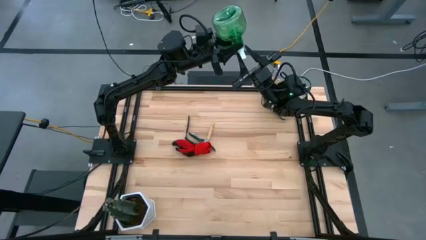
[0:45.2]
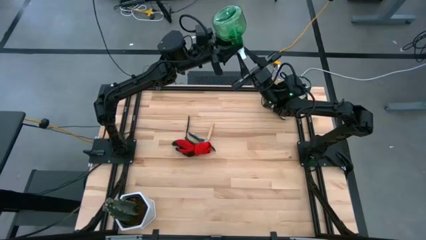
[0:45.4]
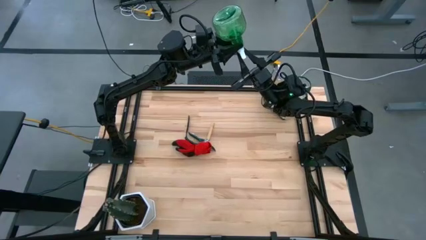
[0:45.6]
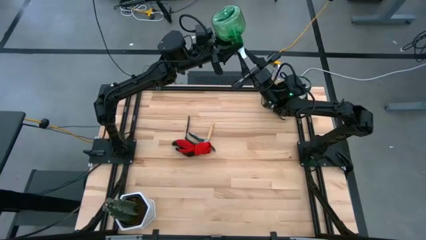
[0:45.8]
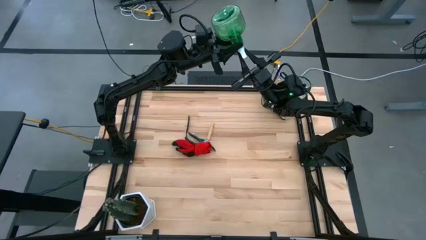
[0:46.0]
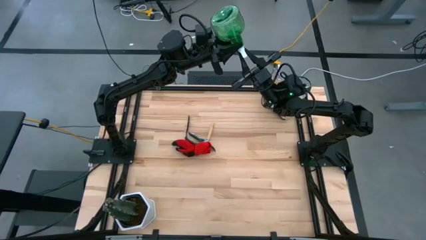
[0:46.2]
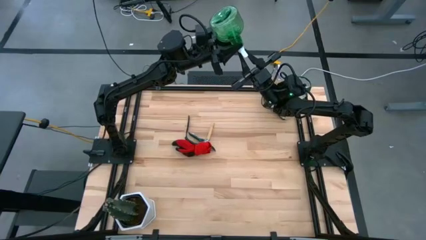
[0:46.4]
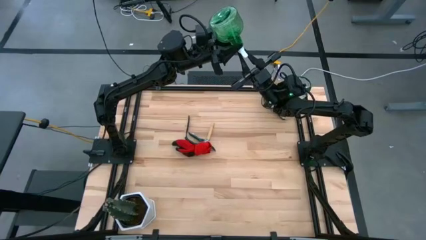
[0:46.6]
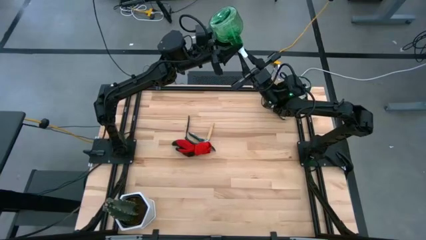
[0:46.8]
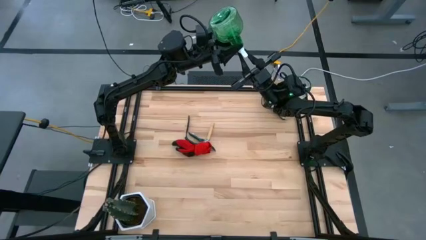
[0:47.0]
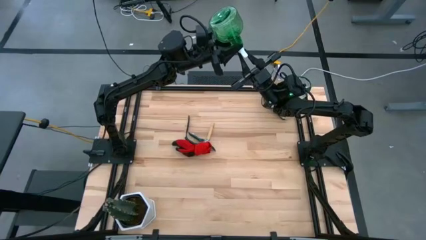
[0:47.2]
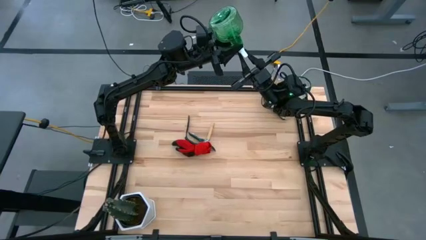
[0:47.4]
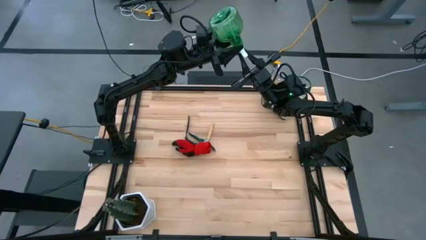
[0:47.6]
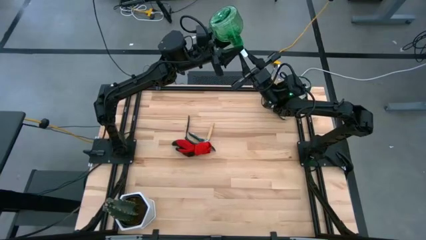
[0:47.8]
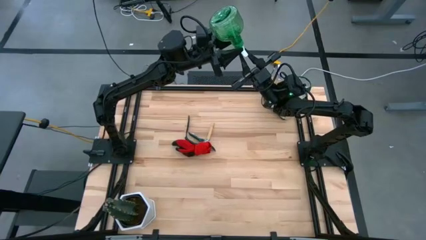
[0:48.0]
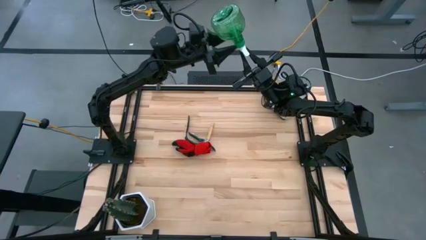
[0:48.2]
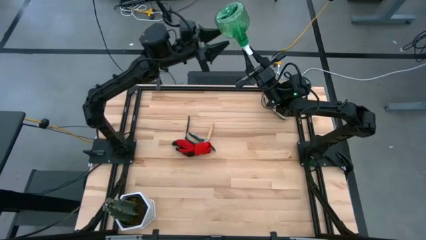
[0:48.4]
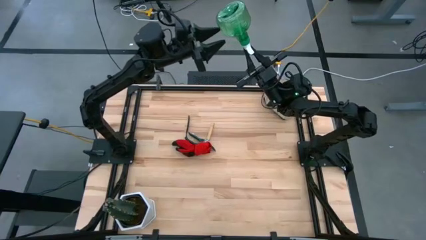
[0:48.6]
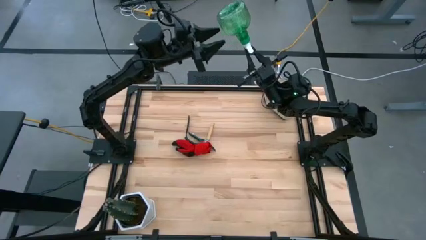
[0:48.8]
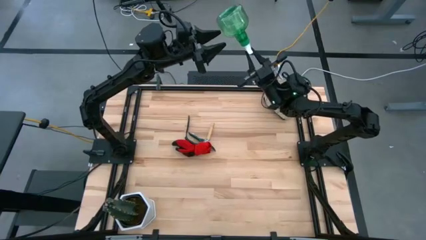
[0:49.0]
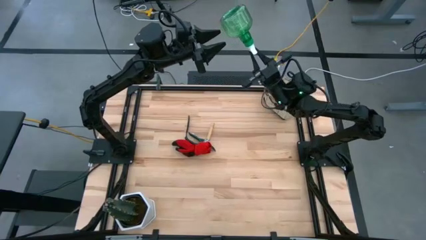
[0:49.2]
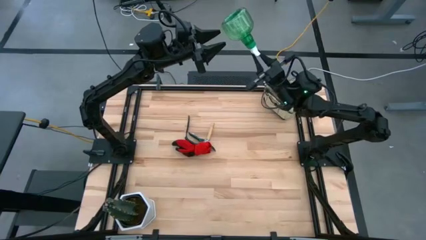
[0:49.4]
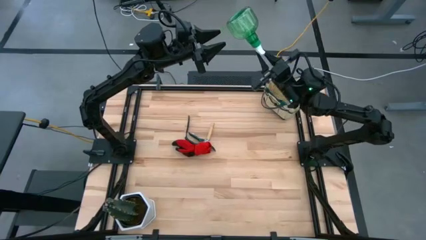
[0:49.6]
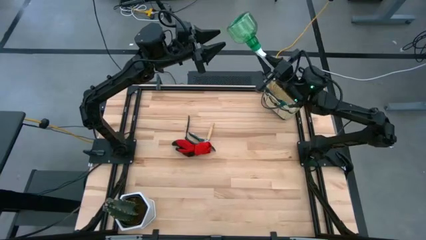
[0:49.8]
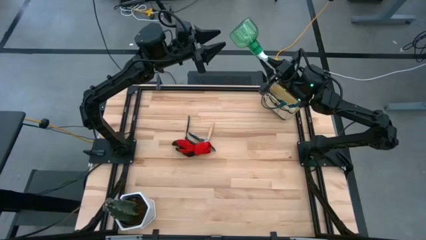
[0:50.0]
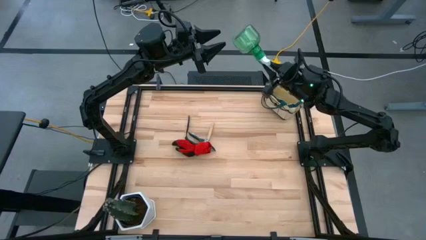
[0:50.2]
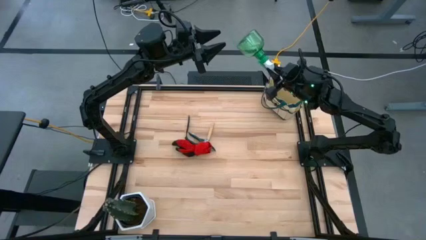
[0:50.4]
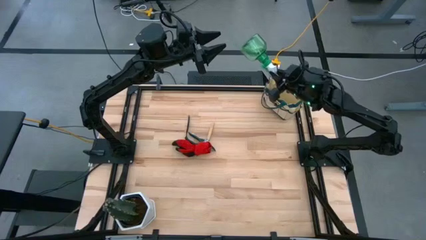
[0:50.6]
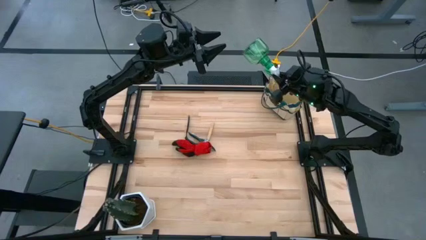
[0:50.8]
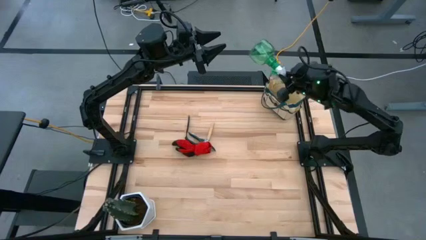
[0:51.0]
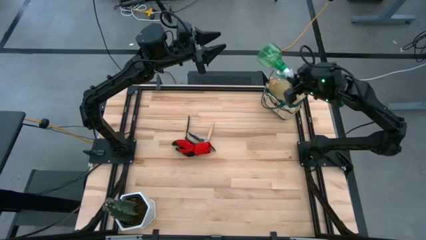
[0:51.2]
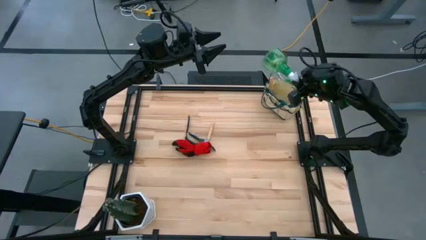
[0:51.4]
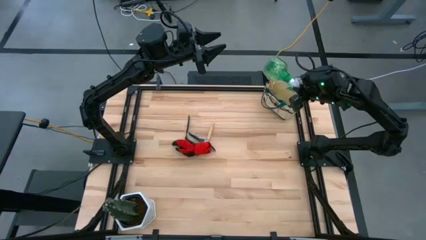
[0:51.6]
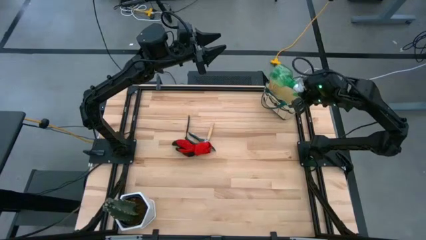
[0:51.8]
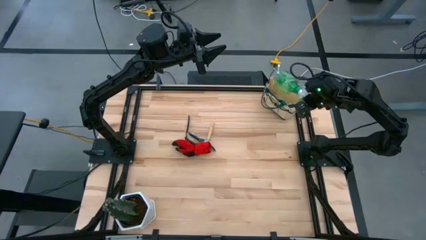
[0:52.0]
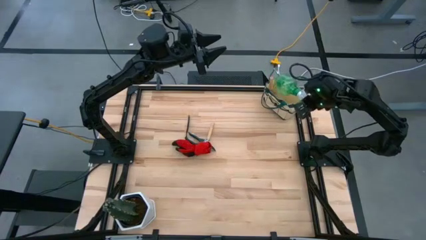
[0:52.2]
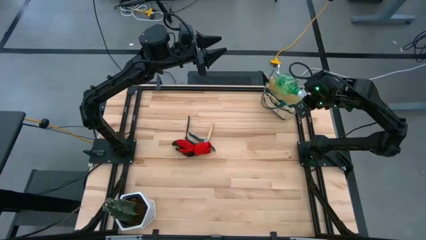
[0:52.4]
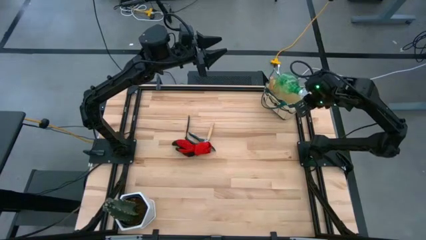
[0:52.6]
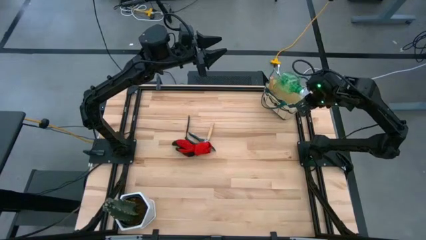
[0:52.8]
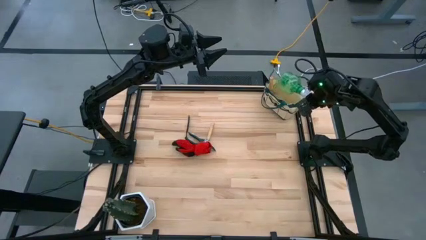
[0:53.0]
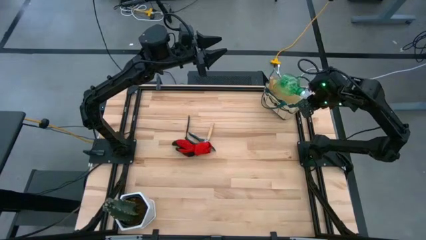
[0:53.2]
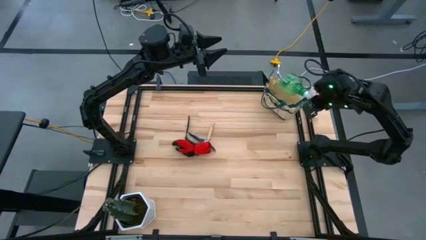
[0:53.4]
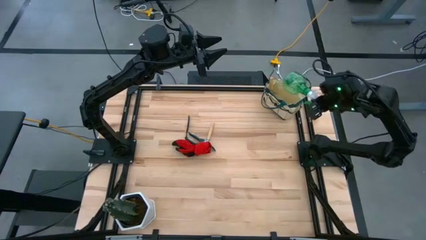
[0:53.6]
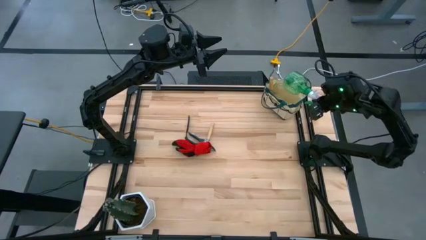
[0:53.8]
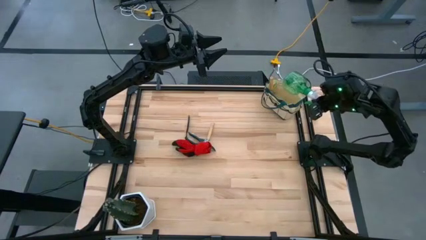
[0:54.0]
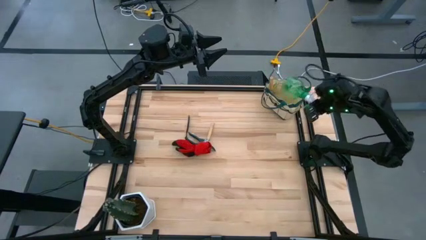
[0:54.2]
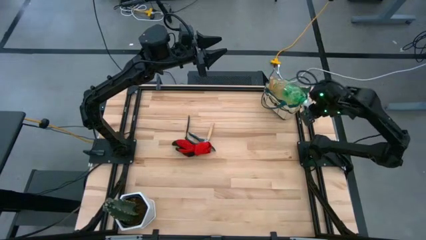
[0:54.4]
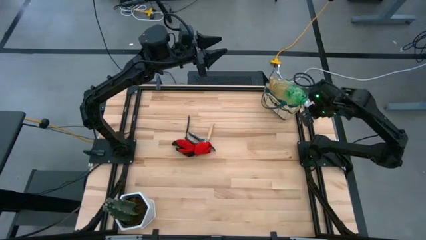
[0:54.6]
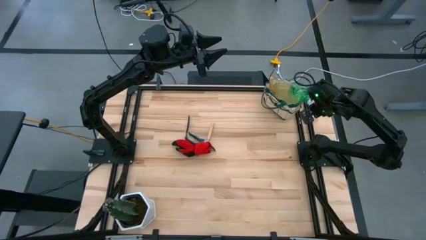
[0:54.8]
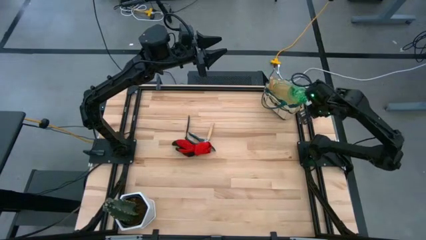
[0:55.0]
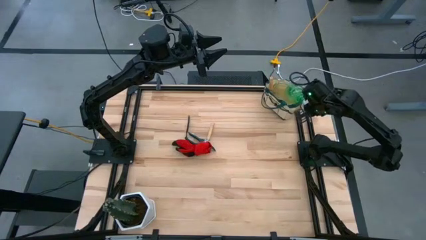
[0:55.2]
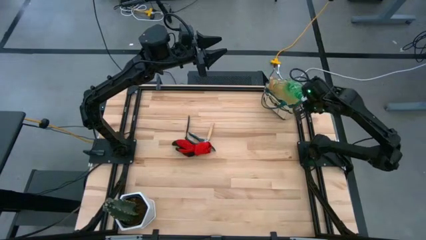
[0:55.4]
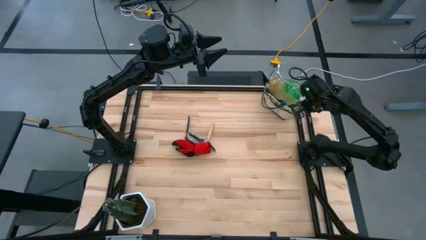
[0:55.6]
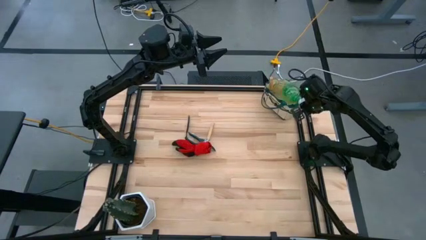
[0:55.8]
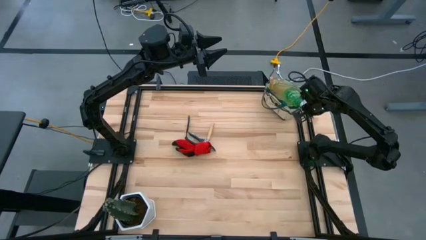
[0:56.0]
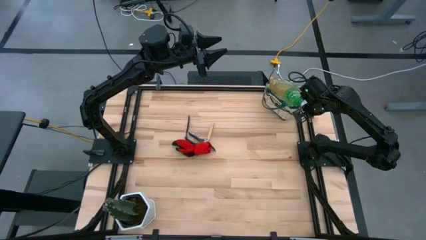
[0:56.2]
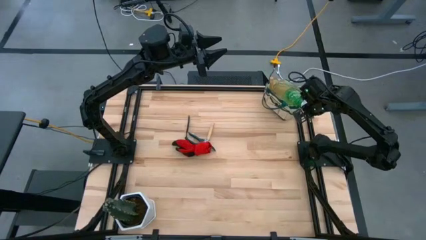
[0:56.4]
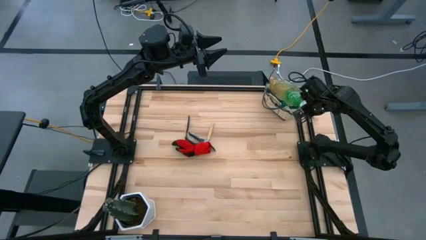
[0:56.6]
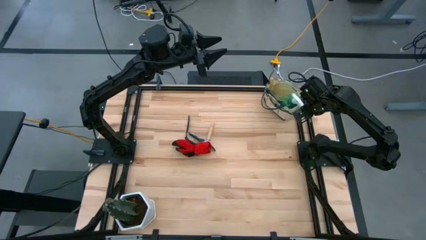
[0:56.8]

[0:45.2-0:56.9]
Task: Pick & Place Garden tools in Gardening bag
Put the green spray bottle into the gardening bag
